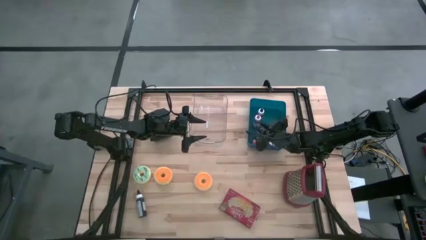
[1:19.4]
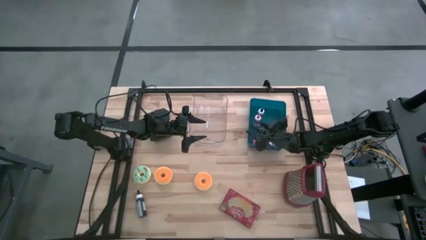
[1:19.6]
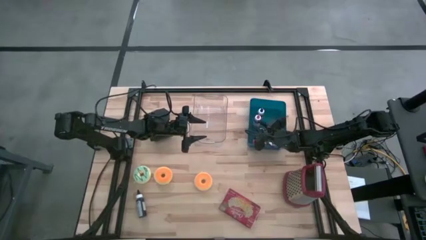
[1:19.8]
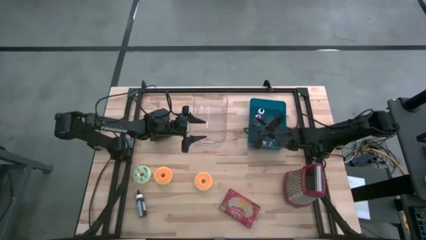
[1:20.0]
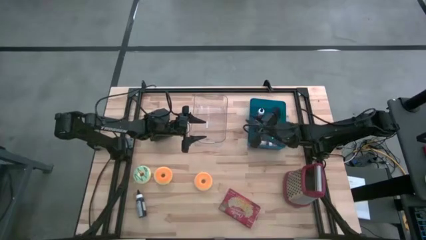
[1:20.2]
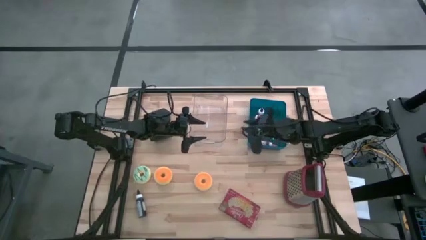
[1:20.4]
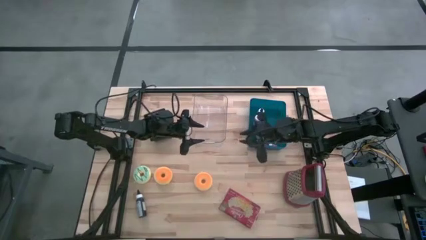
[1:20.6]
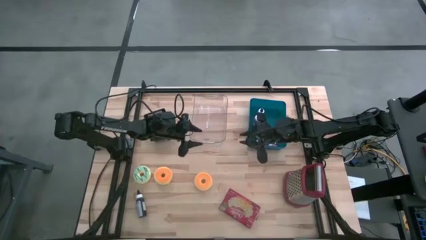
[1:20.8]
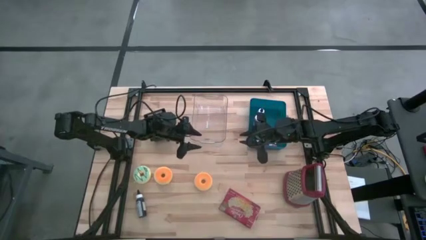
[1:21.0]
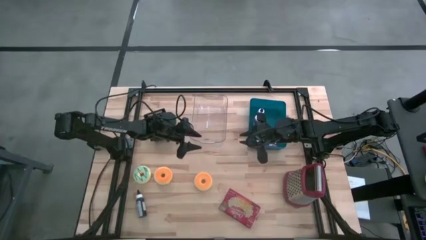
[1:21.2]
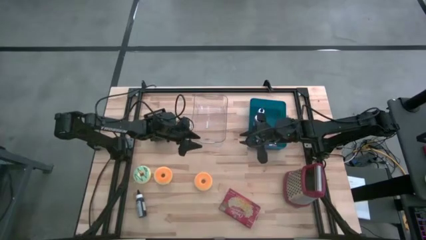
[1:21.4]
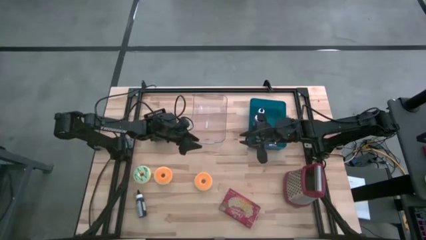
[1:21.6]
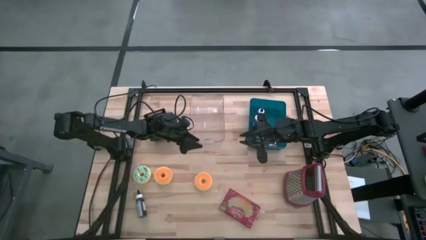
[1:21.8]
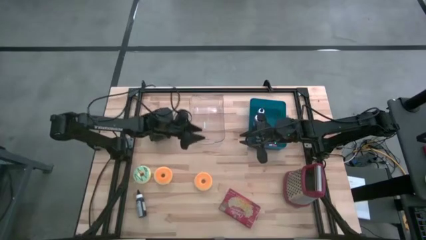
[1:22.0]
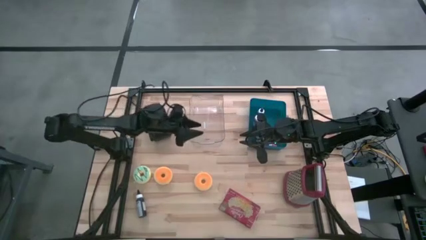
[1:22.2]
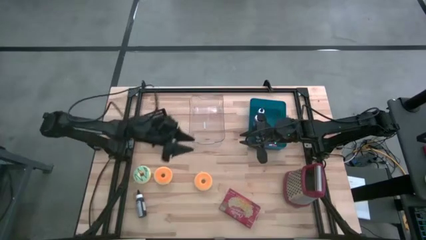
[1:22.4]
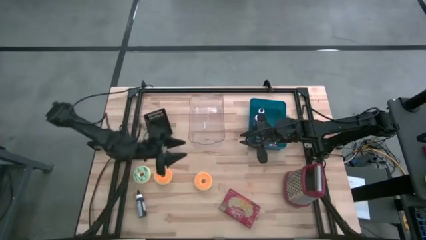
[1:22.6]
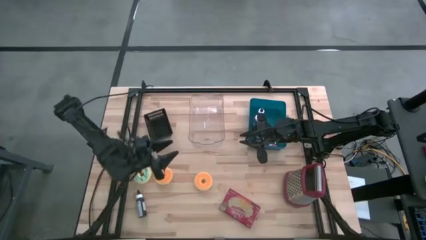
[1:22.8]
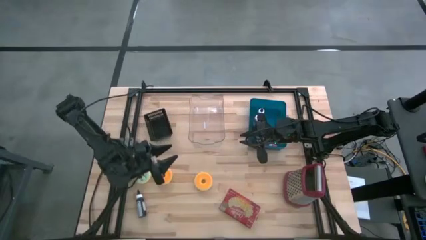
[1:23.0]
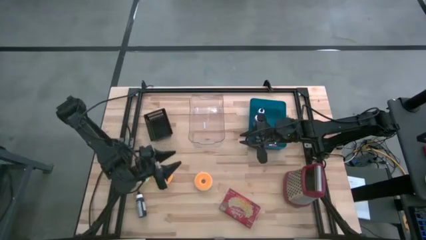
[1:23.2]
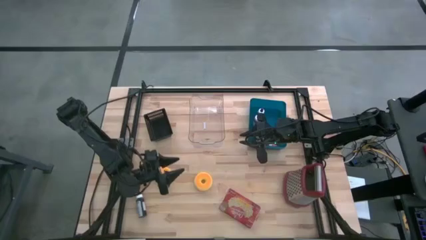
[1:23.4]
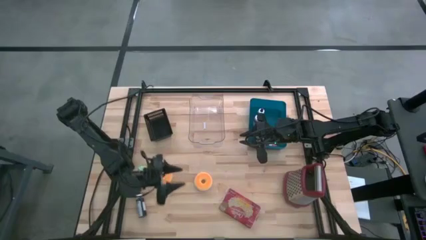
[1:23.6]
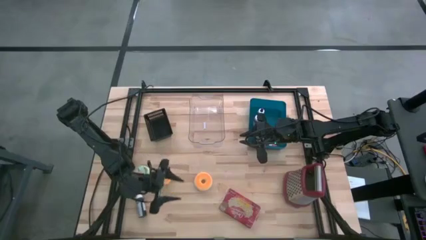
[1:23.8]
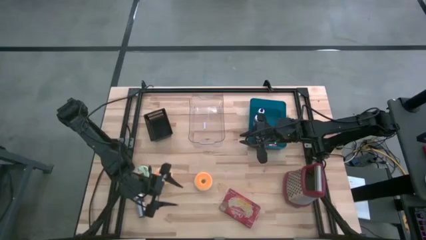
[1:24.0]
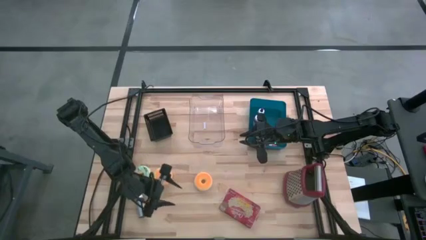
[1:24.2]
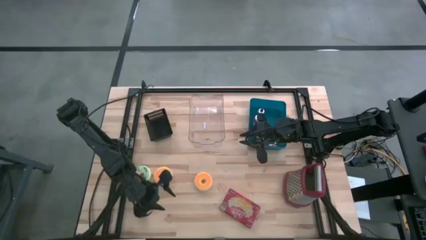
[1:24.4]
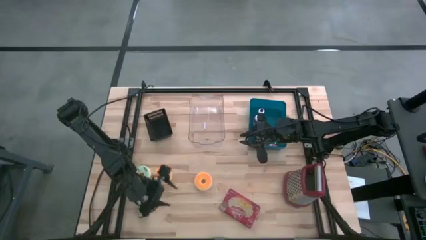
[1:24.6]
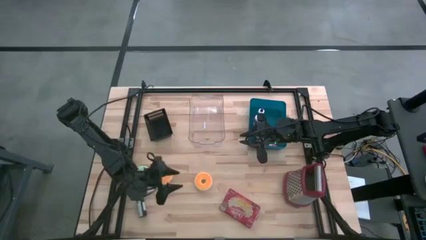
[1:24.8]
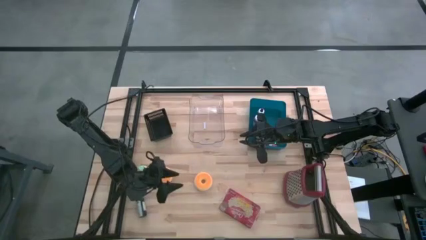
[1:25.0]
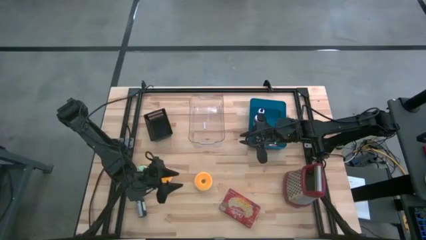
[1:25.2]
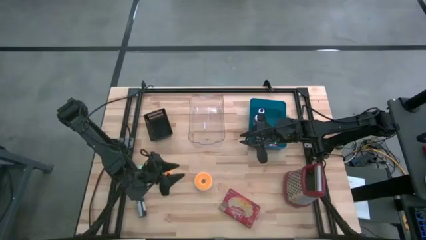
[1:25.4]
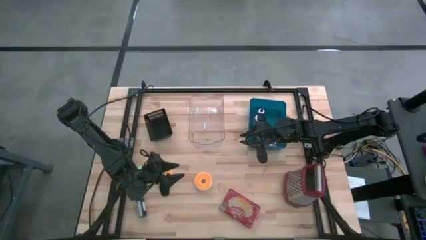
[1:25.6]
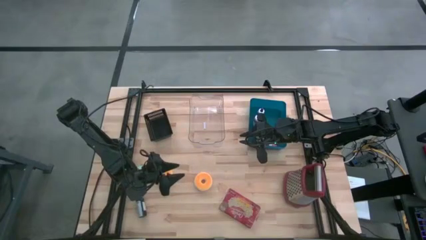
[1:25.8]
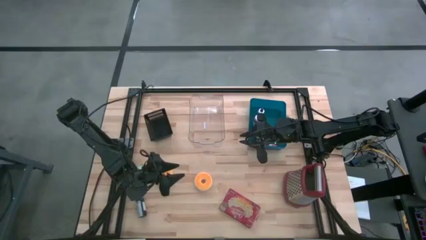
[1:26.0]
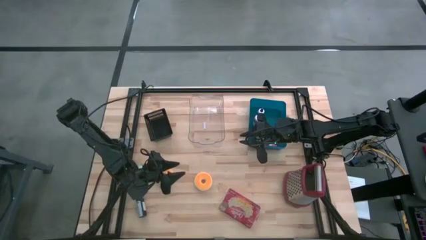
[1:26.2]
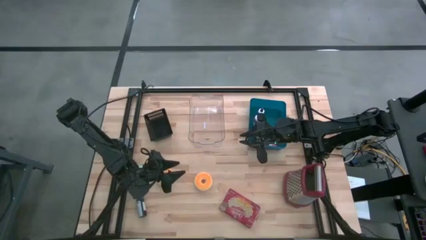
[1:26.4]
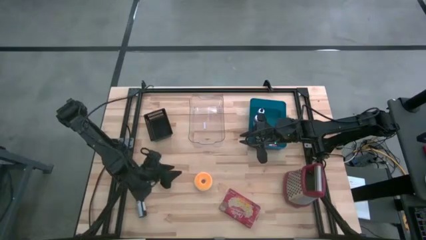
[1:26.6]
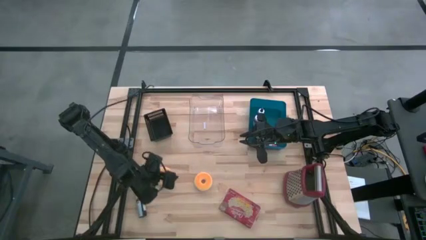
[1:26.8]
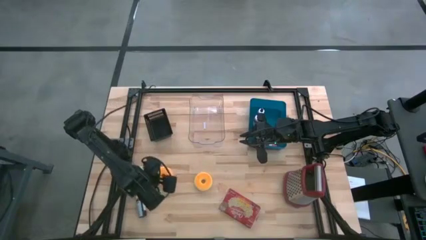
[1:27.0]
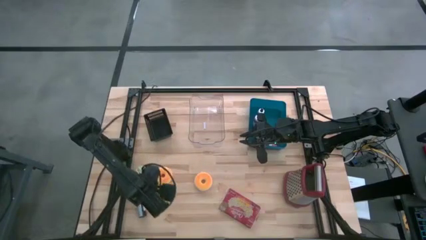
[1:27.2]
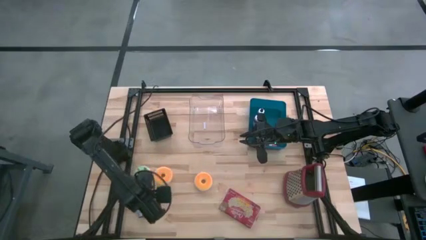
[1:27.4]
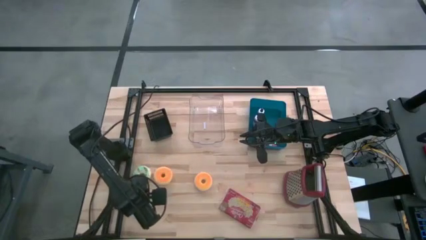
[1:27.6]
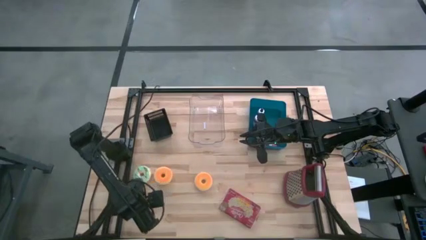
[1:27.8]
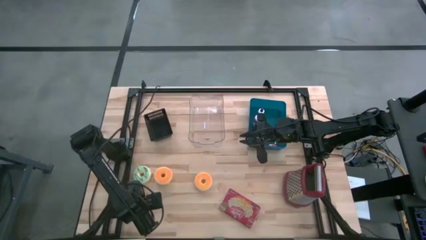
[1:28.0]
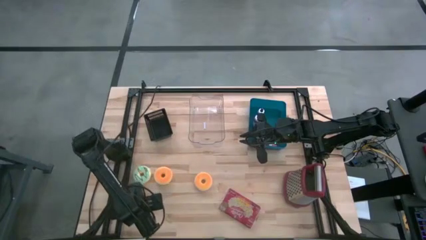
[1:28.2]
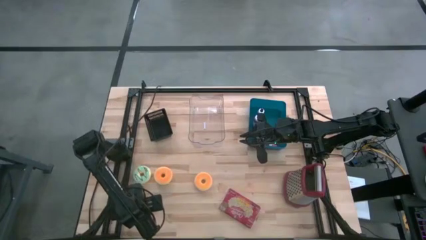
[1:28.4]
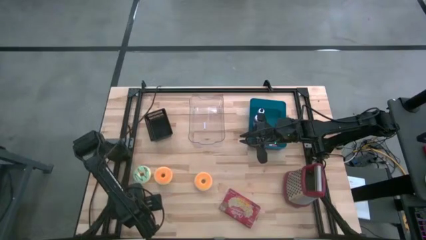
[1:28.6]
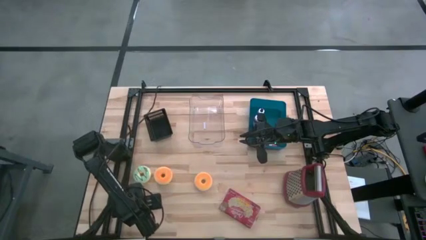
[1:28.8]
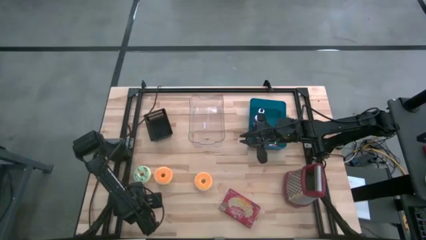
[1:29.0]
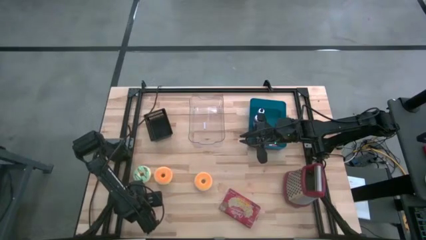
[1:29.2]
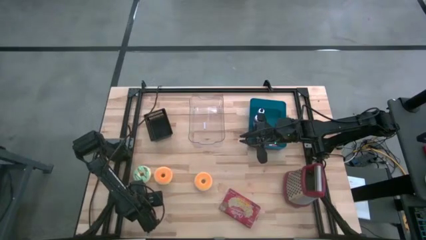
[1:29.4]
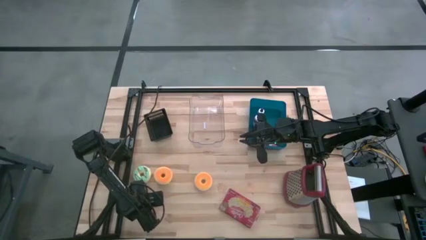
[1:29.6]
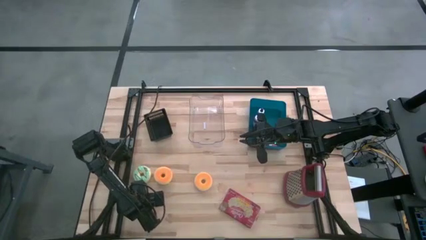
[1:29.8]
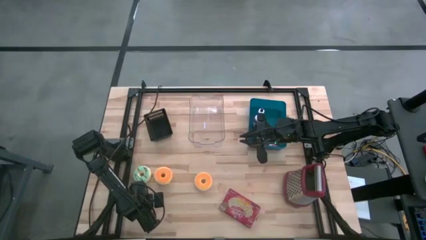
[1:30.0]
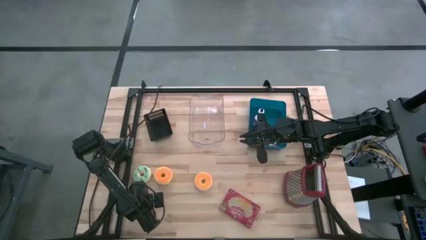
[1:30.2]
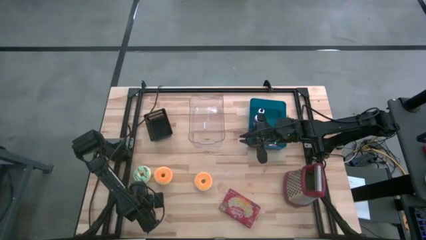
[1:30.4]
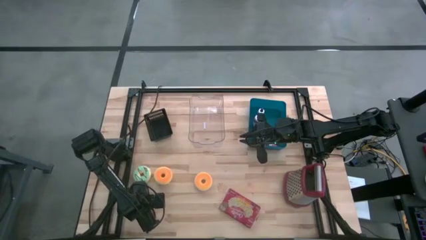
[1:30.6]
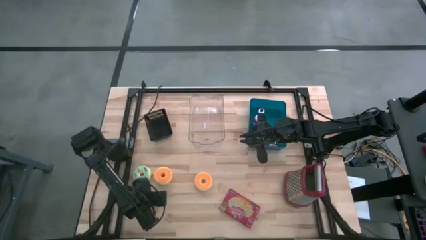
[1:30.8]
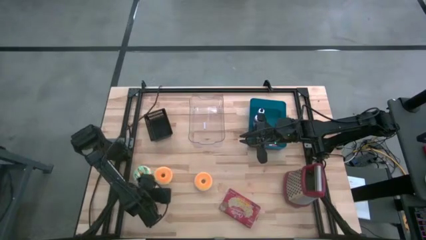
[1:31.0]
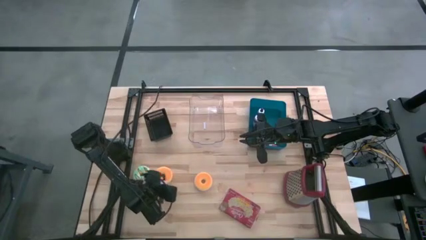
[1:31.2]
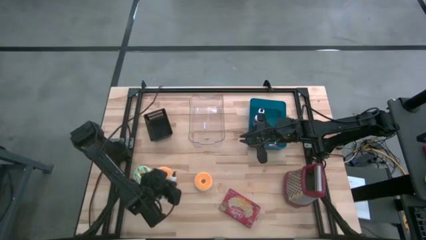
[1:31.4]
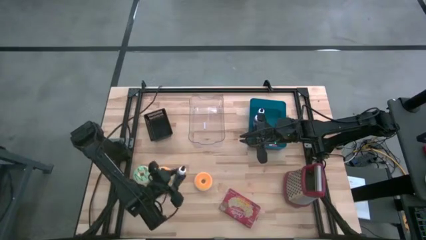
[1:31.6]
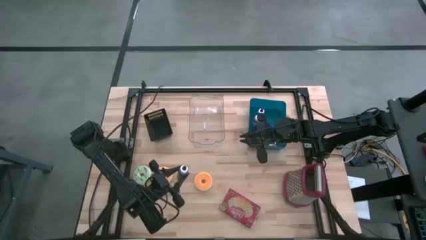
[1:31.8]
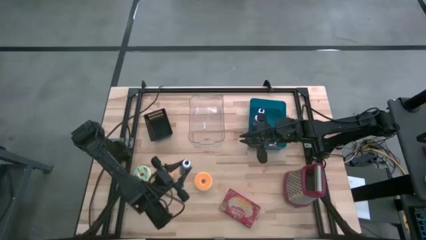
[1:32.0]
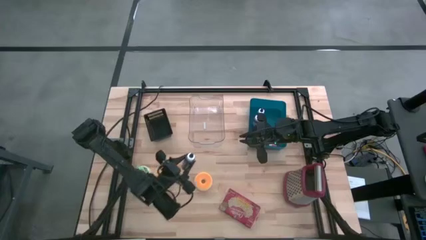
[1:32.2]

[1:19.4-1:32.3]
Task: Pick & Place Food Item
Put the black food coloring bottle into the blue bin
